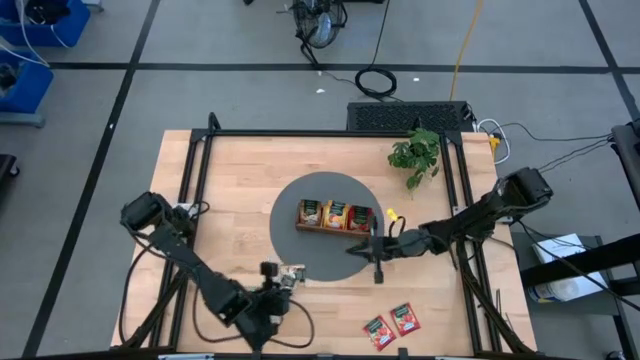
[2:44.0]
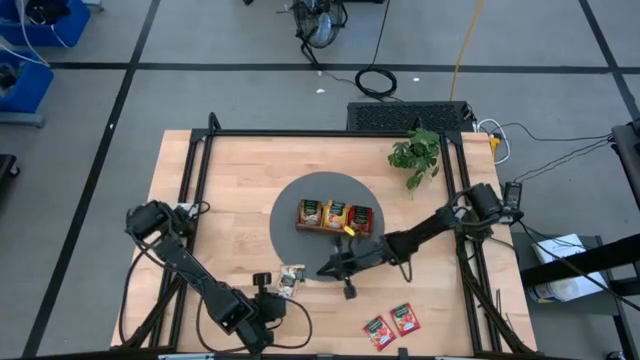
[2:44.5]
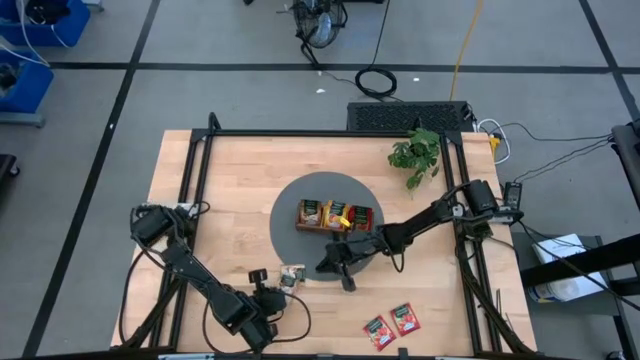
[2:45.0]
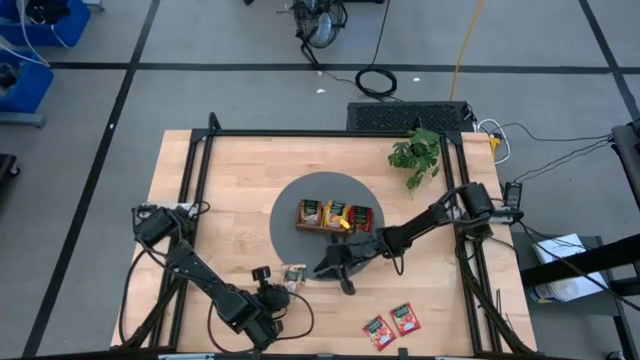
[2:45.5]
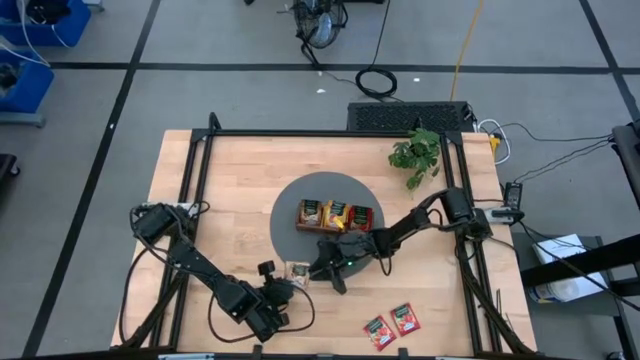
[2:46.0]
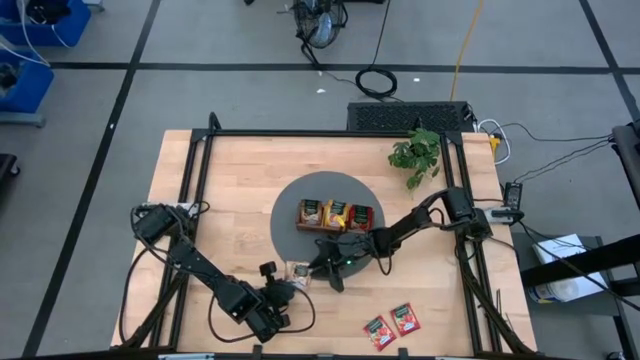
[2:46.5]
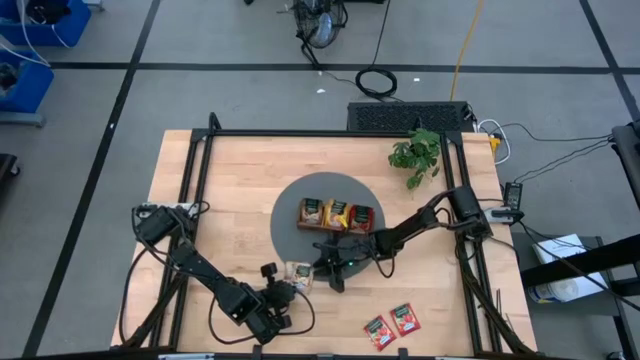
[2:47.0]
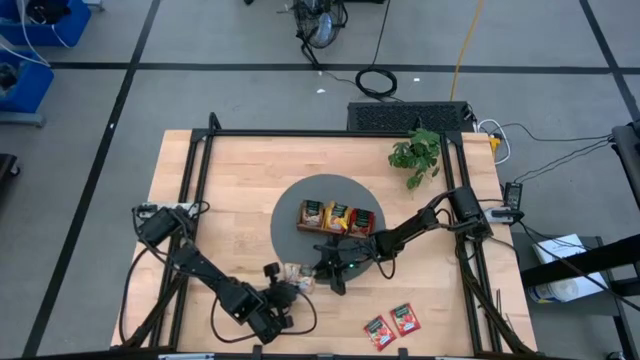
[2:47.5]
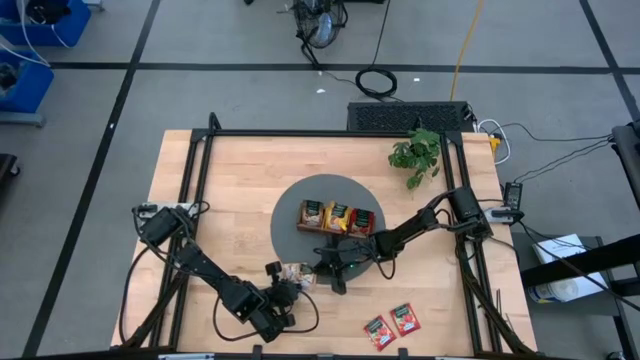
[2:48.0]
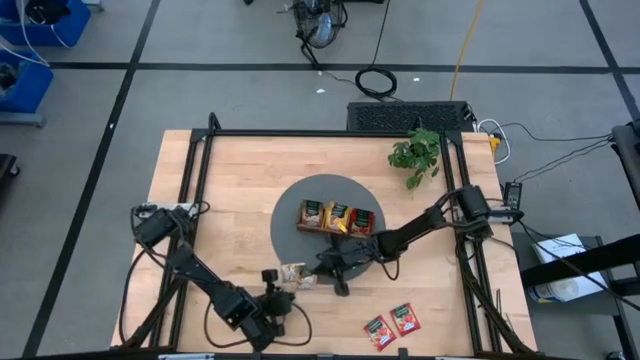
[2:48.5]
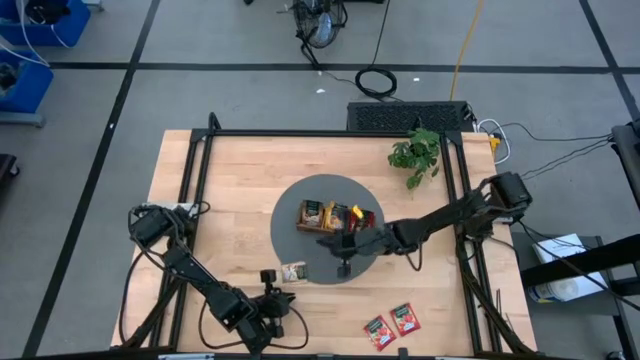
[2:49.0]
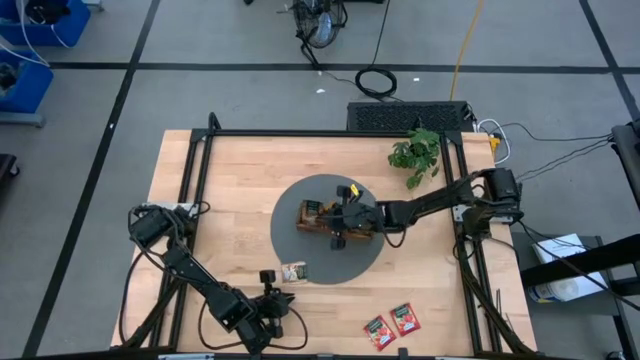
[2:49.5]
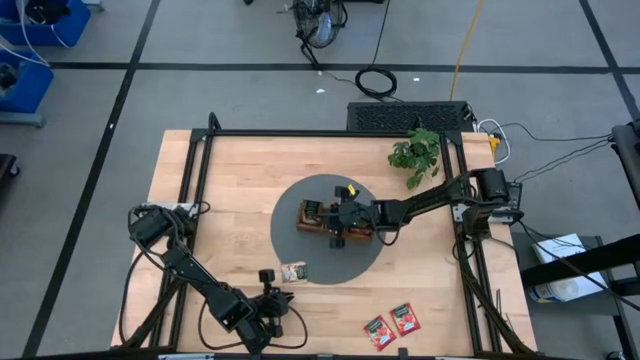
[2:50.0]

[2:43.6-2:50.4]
Task: Pick & Place Tea
Put the gold tea bag into the left compartment of the wooden organizer

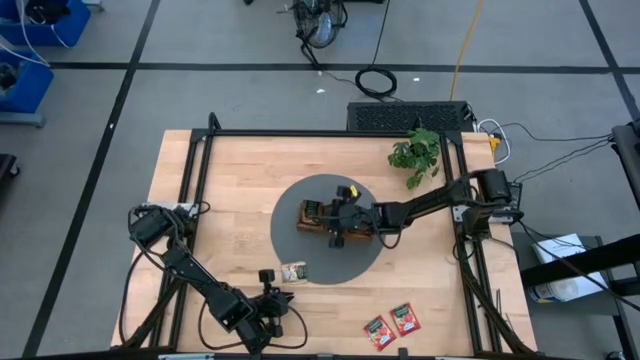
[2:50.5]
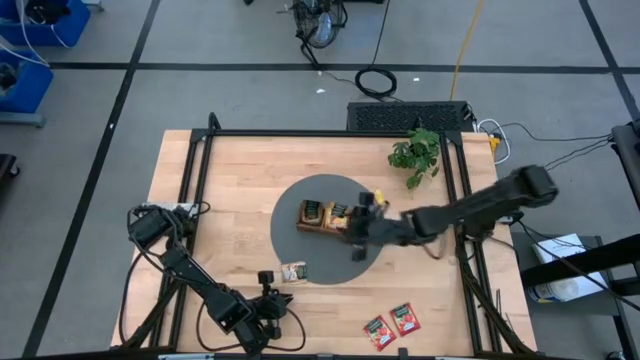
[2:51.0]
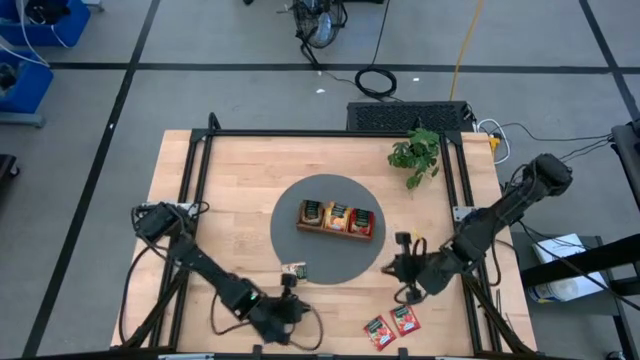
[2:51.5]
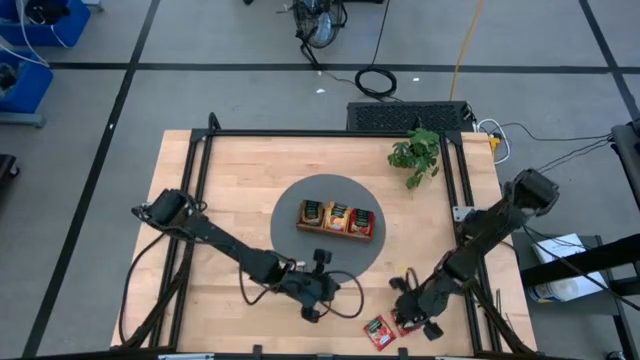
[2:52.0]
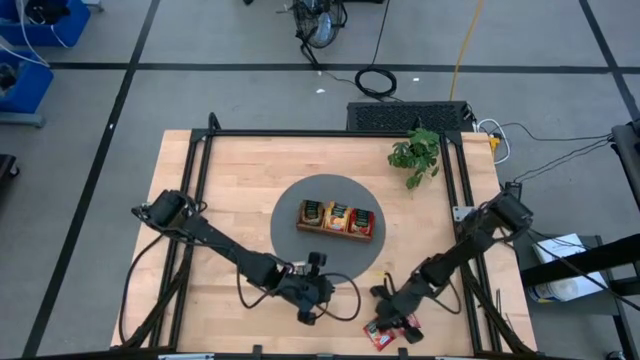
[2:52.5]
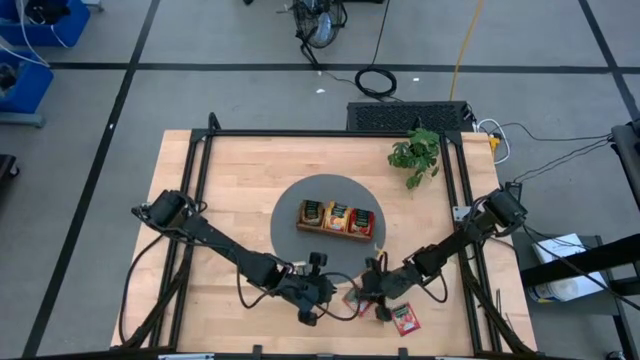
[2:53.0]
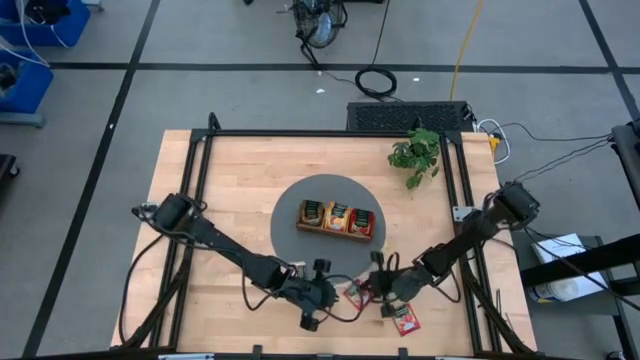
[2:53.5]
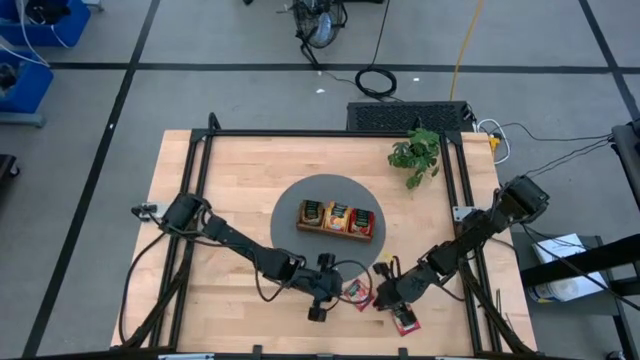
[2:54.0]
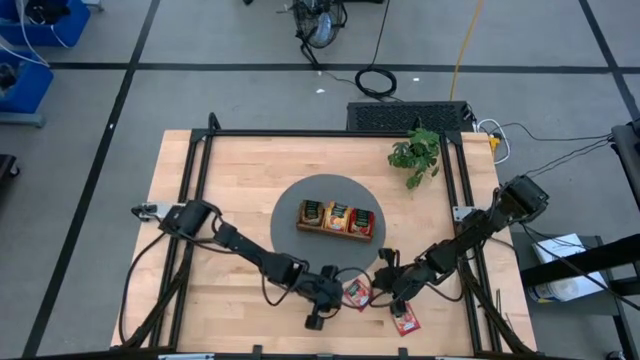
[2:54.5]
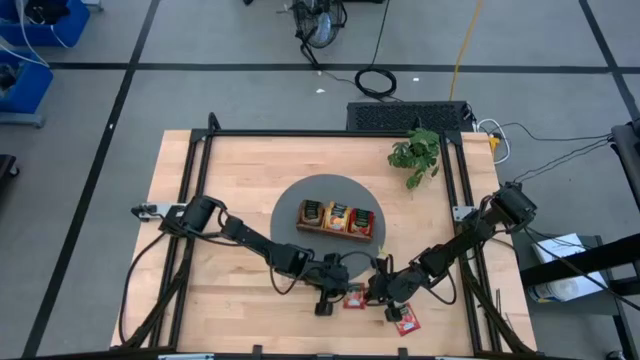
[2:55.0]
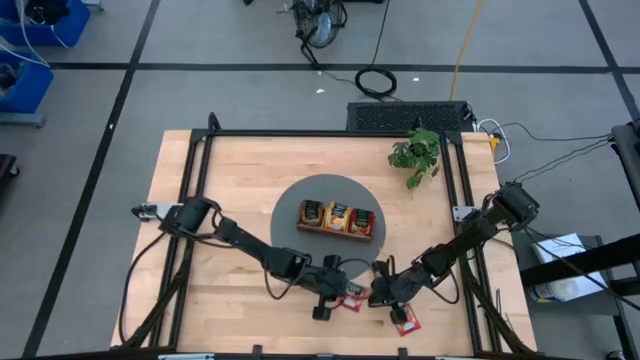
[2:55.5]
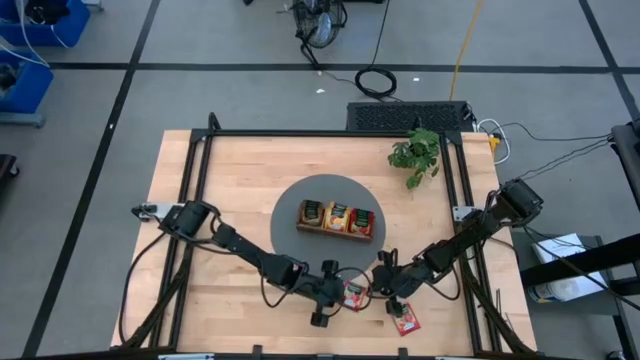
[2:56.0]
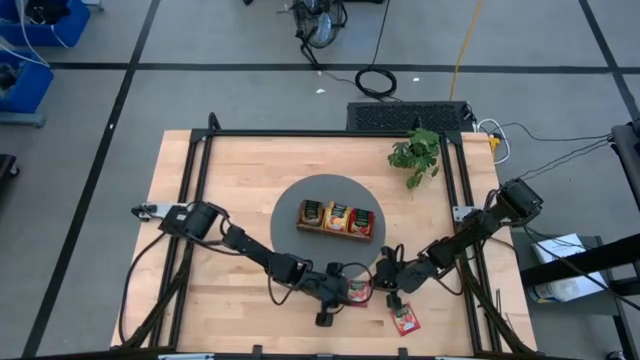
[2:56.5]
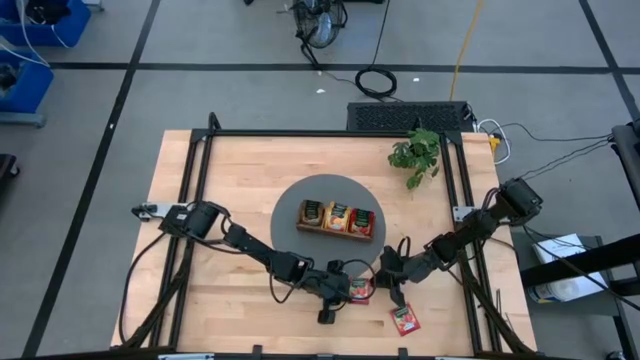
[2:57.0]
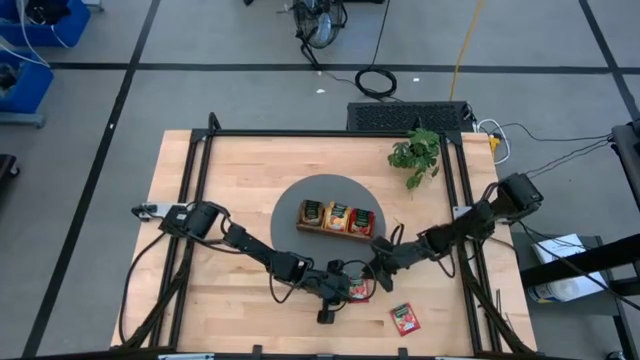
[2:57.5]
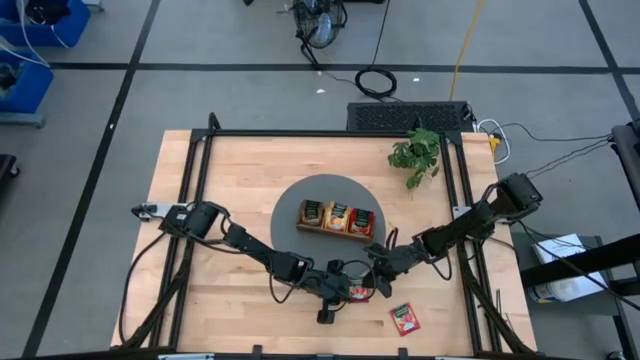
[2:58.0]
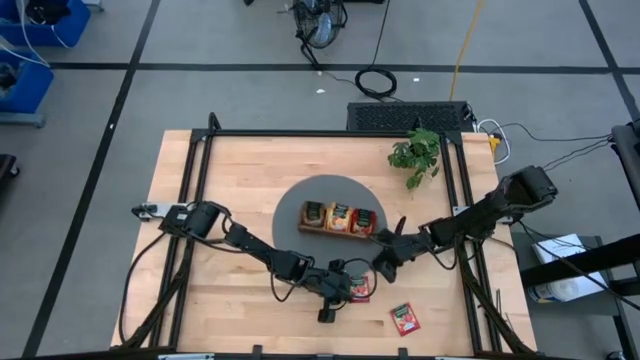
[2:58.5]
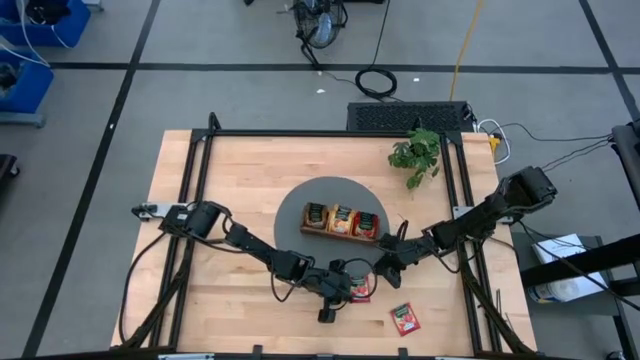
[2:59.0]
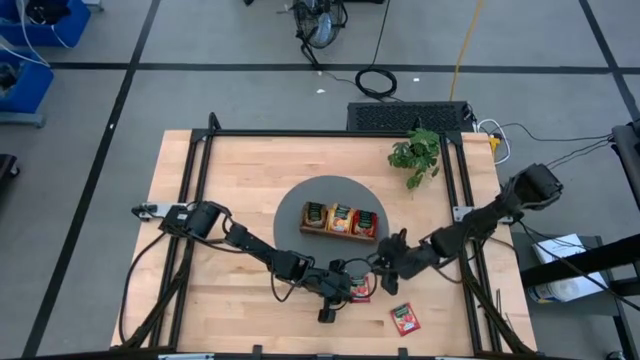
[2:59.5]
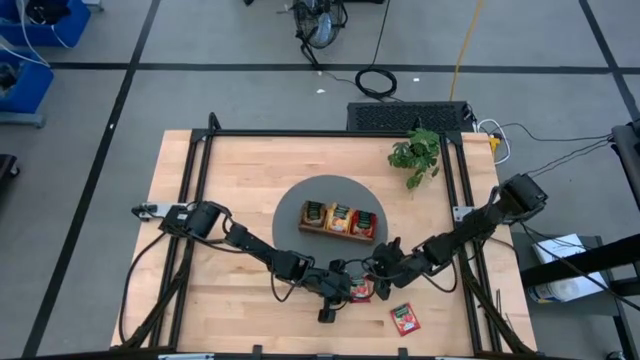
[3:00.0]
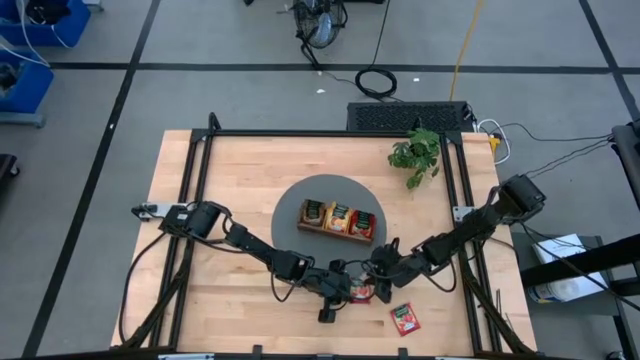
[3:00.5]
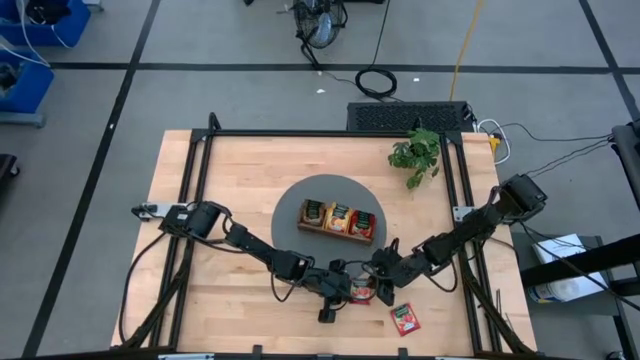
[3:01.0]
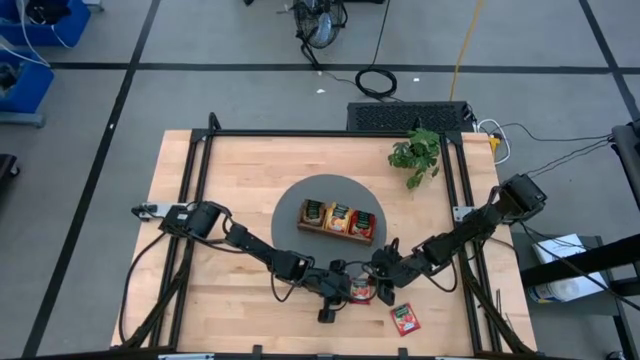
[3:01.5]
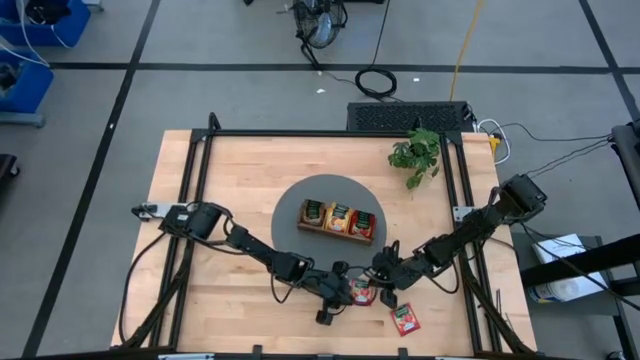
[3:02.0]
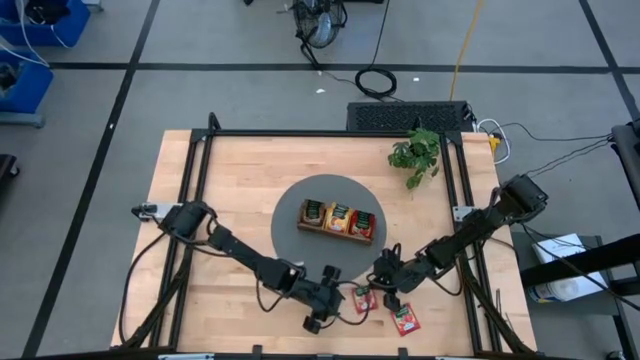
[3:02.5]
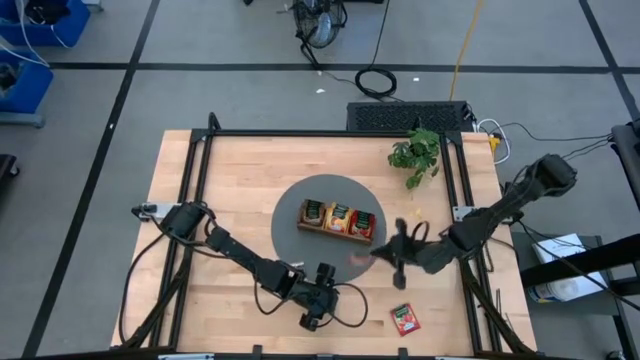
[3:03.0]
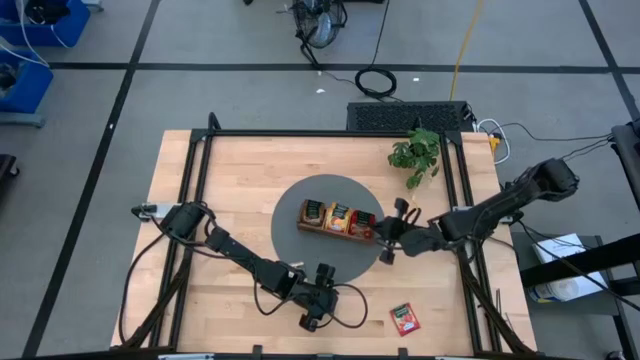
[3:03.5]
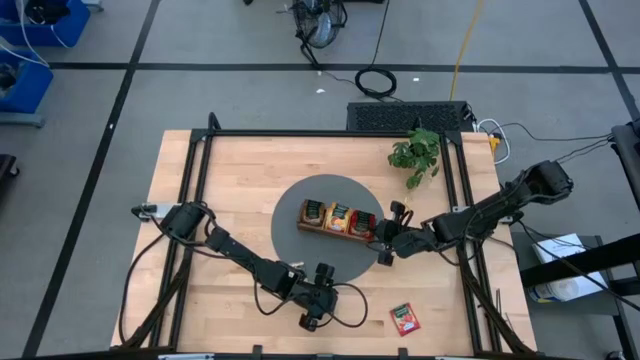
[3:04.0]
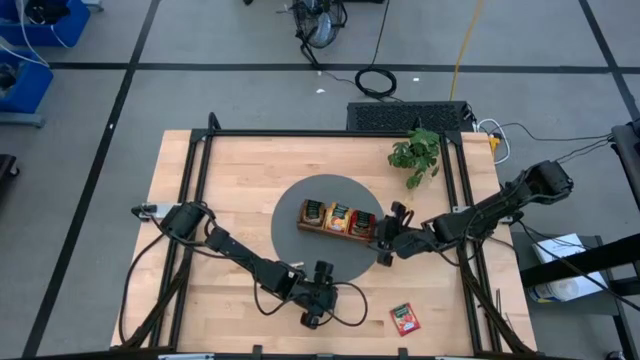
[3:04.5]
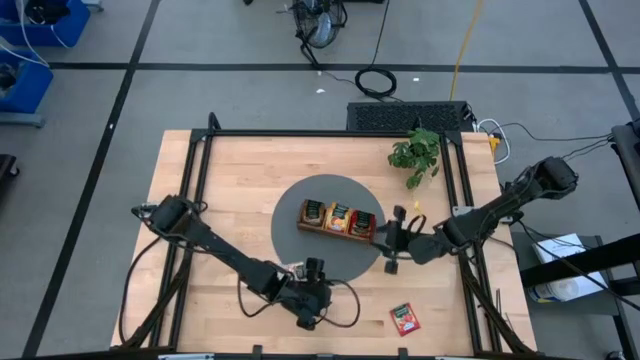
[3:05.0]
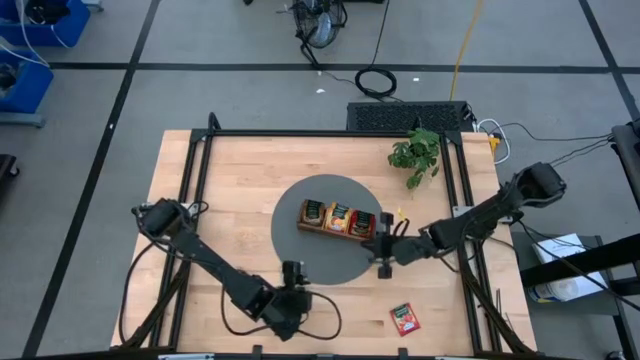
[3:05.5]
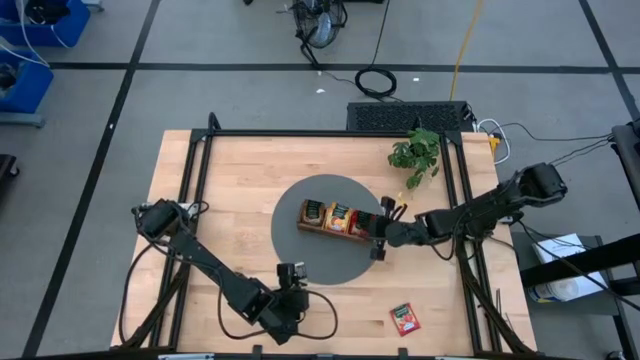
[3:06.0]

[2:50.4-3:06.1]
Put the red tea bag into the right compartment of the wooden organizer
